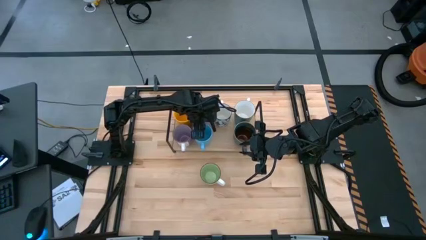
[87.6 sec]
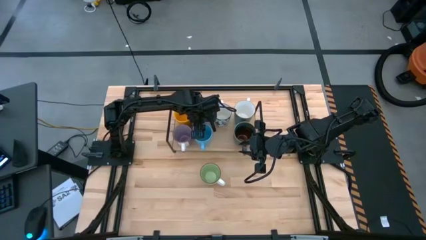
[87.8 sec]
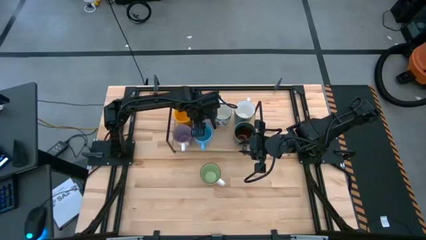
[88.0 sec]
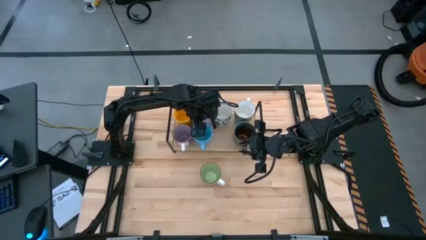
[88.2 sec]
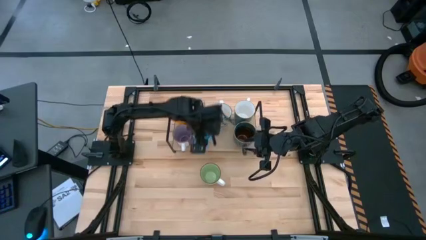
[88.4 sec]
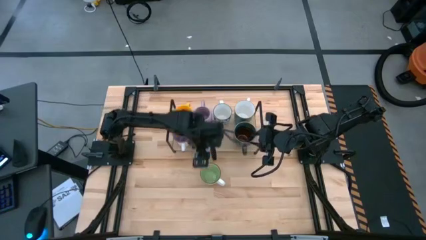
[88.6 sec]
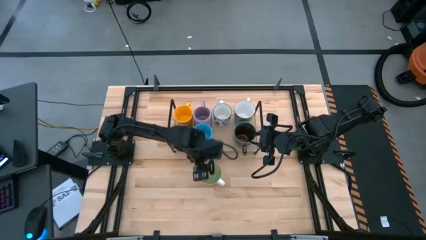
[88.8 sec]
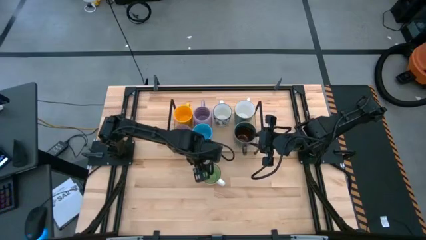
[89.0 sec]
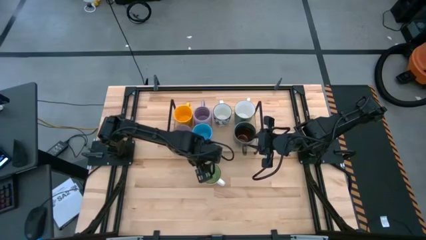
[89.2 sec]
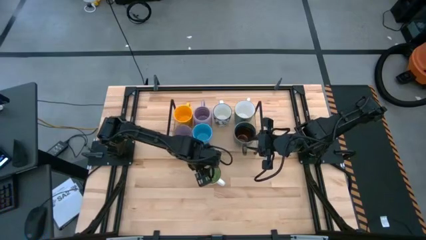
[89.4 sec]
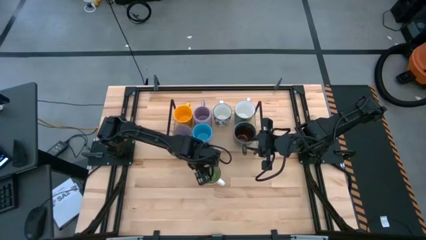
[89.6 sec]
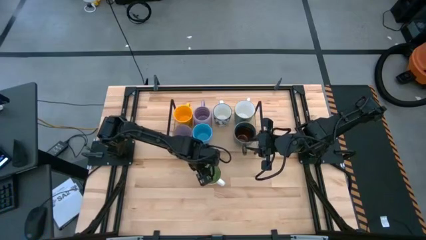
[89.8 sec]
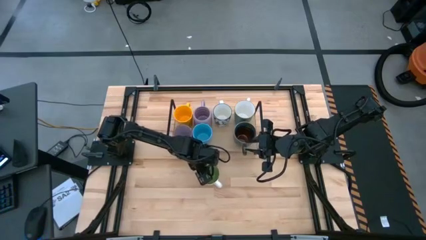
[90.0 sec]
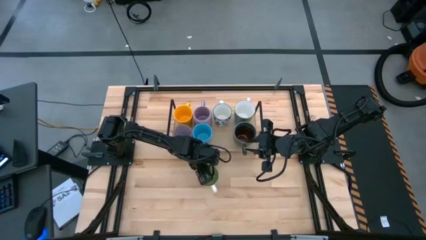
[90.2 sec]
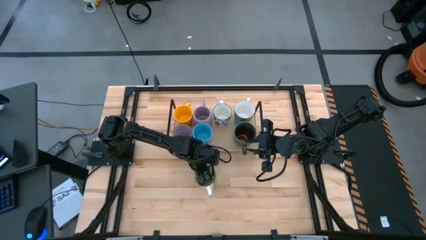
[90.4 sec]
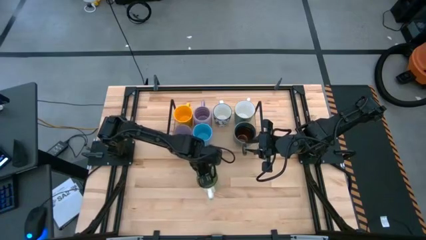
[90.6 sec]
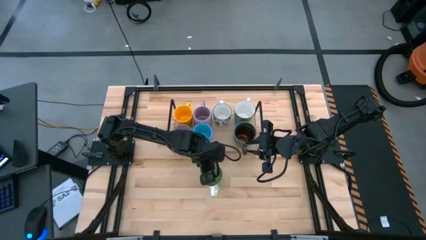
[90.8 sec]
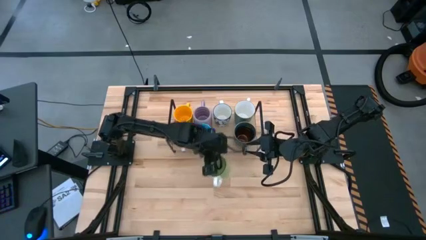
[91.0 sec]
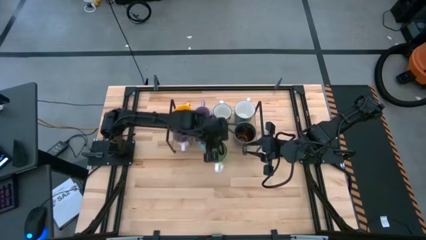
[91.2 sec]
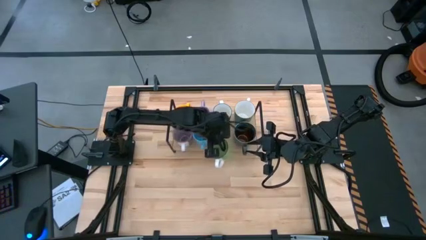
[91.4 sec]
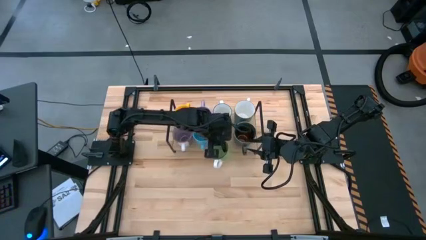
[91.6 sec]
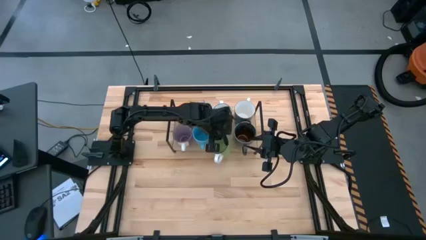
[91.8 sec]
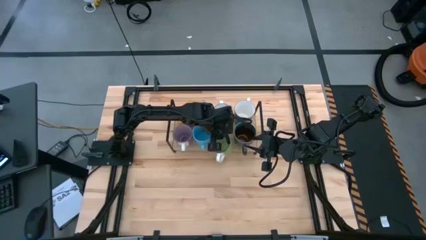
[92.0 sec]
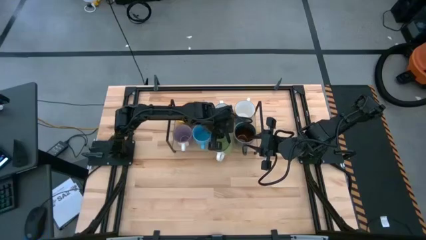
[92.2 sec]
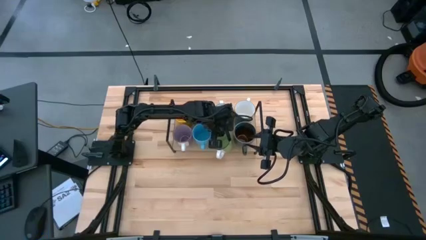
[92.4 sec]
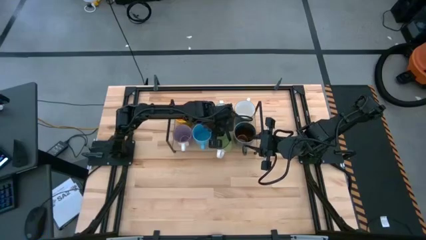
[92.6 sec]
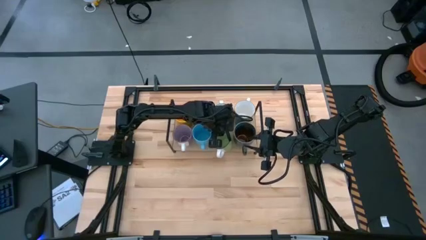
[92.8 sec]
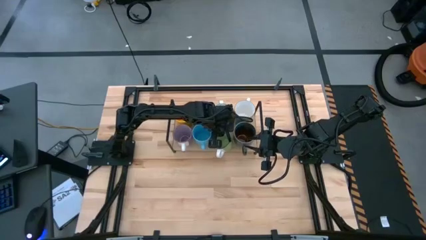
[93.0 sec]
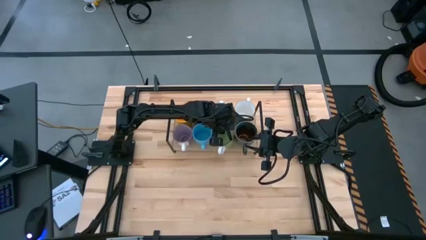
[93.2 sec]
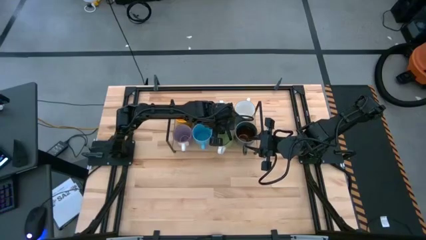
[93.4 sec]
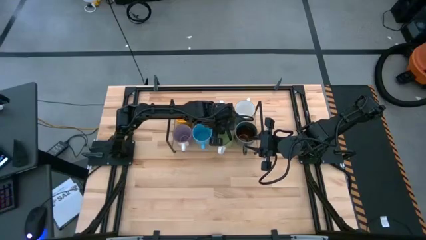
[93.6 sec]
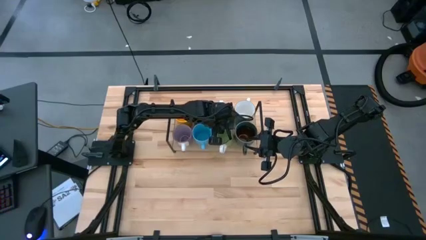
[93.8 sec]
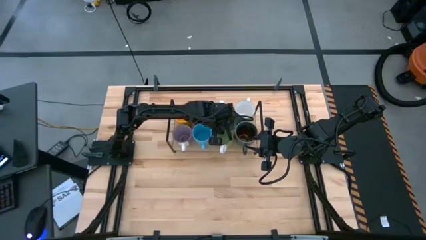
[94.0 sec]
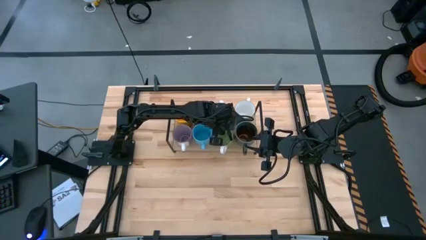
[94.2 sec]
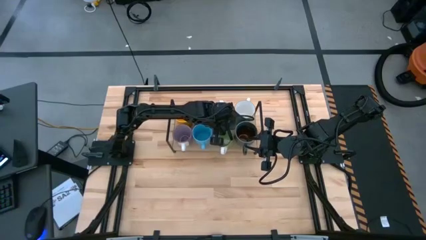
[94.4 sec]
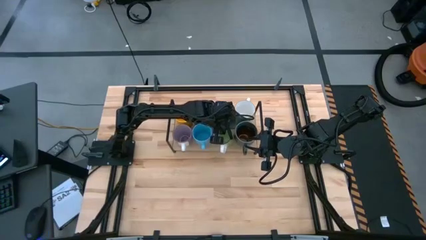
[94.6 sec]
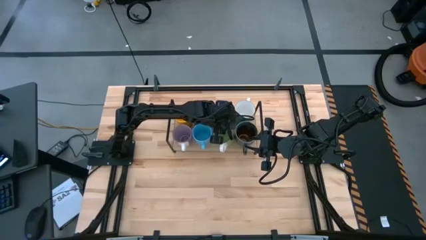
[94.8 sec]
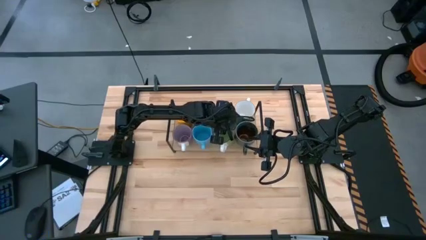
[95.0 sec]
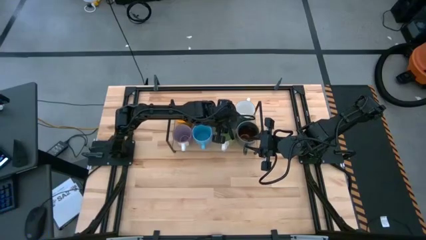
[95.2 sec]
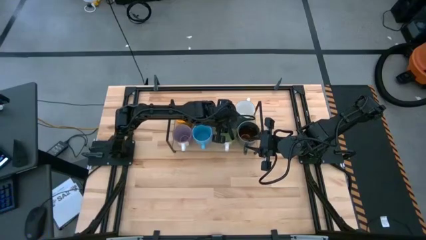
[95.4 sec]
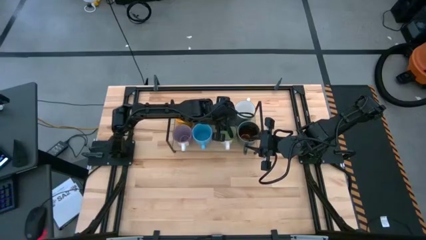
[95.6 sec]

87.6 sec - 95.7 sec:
Task: Place coffee mugs
Put the green mug on the shelf

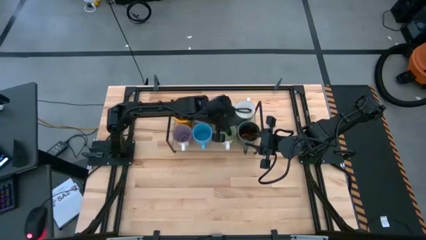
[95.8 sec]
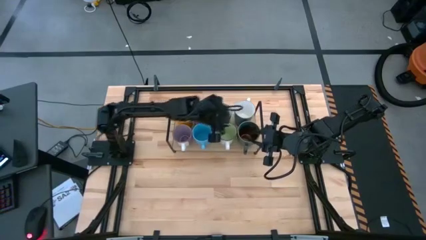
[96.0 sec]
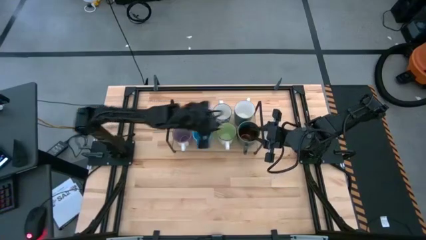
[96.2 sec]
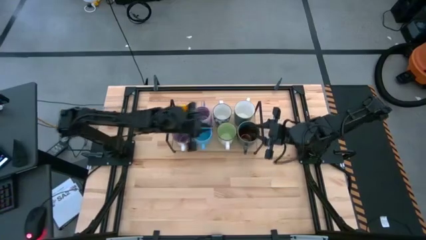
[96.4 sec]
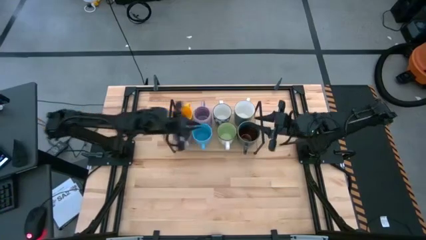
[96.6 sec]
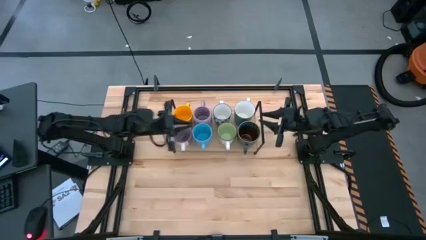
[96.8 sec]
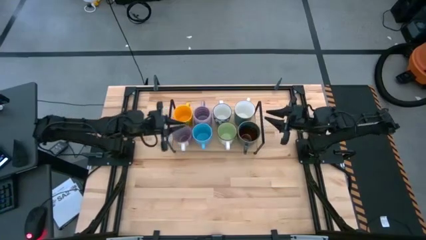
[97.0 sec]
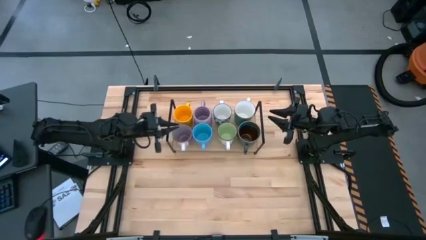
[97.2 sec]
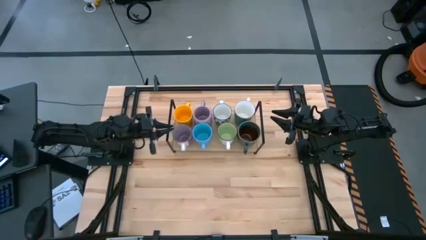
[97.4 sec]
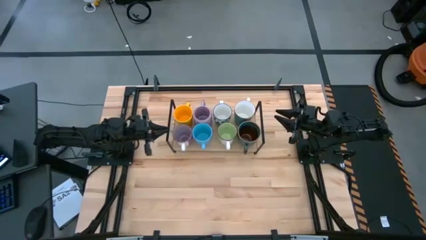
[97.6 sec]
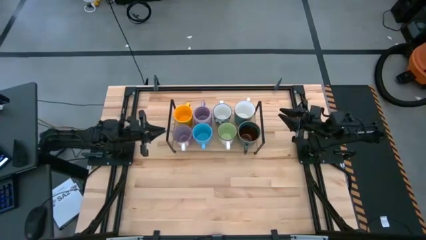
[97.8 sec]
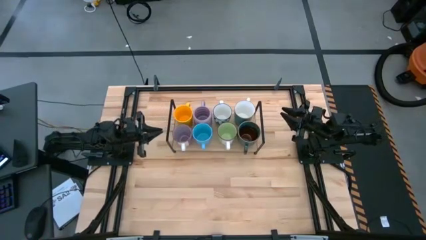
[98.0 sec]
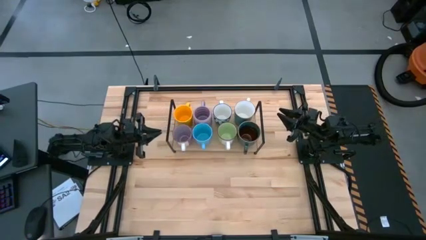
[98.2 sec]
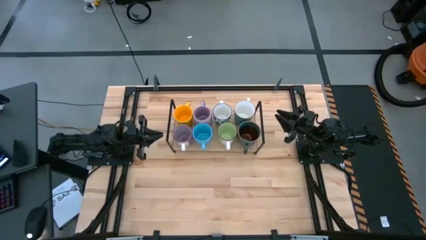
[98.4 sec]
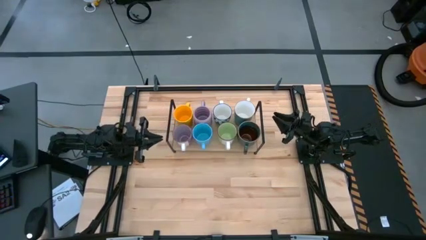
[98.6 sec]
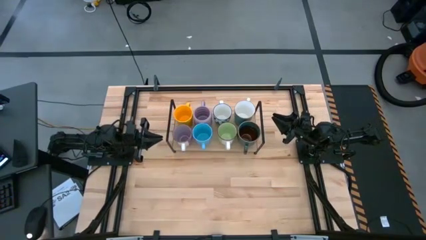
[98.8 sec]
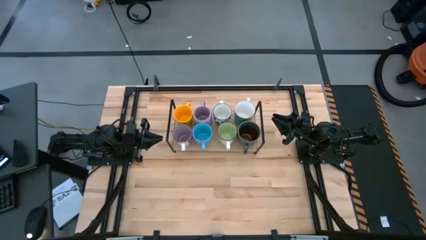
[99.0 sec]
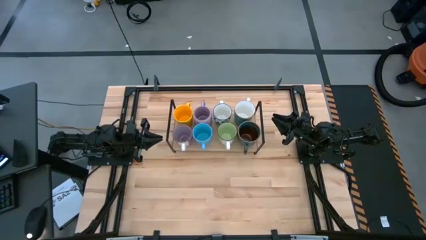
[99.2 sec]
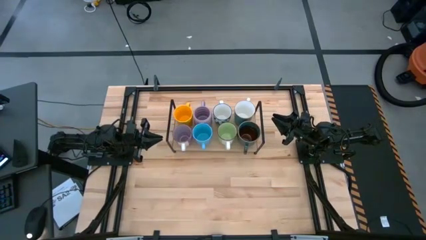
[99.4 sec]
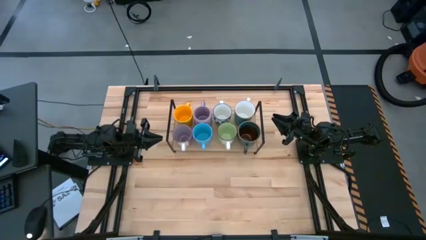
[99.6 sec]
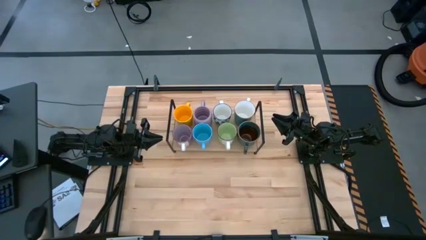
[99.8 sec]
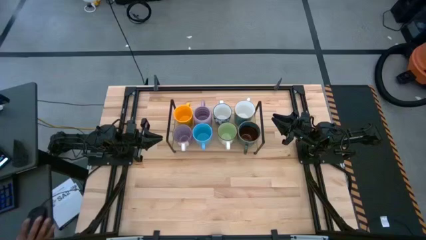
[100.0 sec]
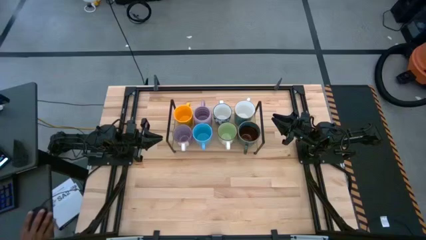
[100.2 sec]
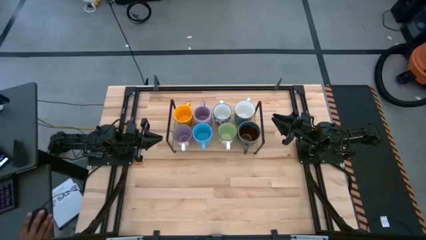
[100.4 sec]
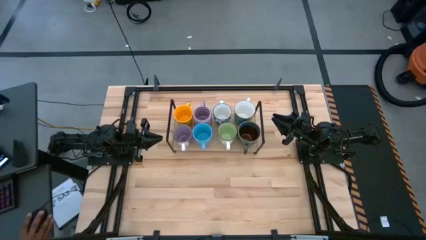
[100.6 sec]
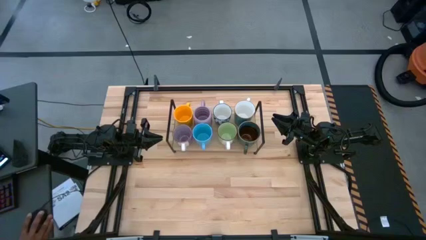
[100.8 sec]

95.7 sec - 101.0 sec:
Return to Home Position

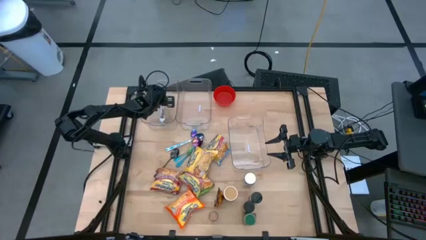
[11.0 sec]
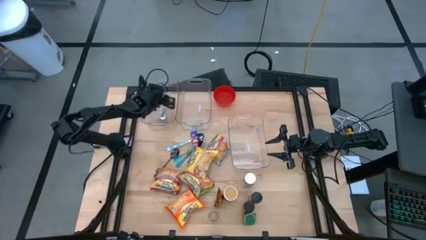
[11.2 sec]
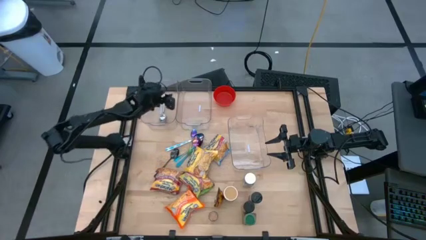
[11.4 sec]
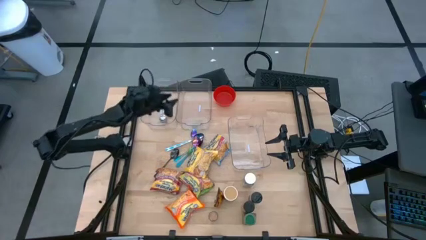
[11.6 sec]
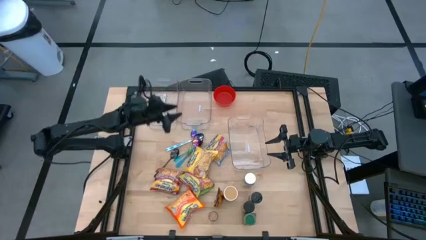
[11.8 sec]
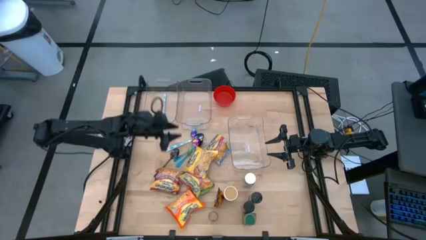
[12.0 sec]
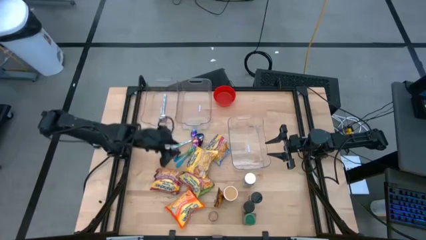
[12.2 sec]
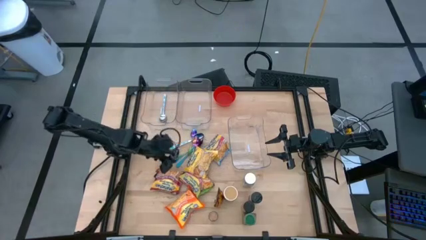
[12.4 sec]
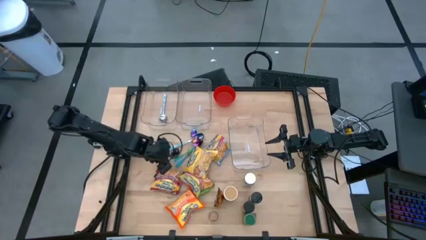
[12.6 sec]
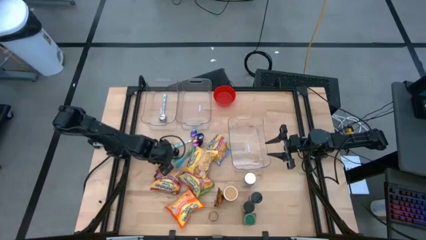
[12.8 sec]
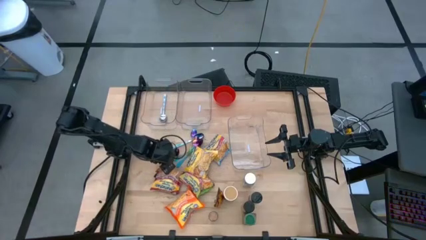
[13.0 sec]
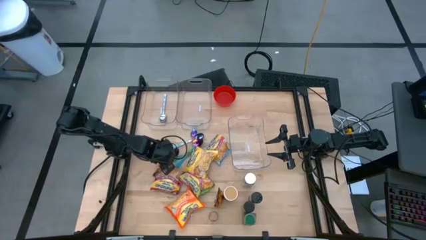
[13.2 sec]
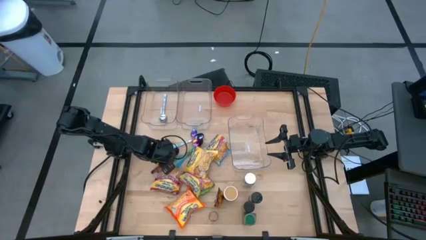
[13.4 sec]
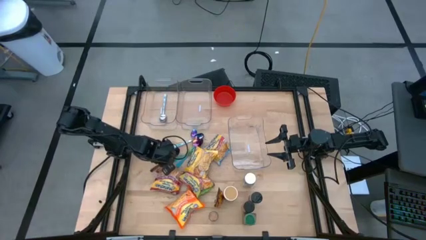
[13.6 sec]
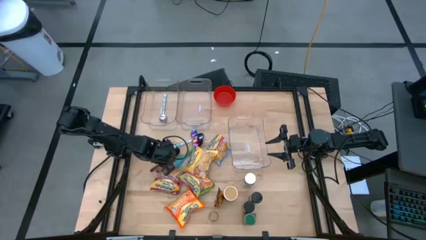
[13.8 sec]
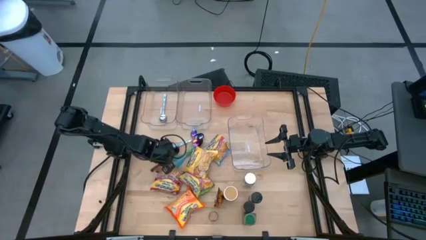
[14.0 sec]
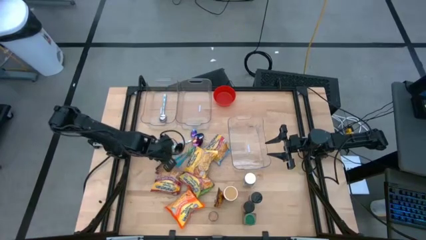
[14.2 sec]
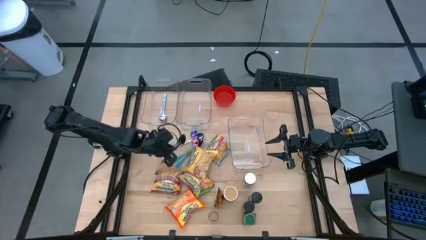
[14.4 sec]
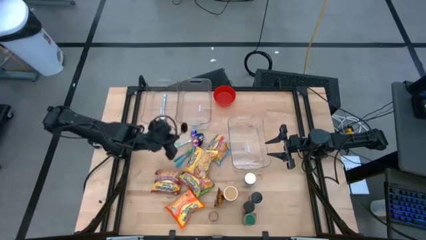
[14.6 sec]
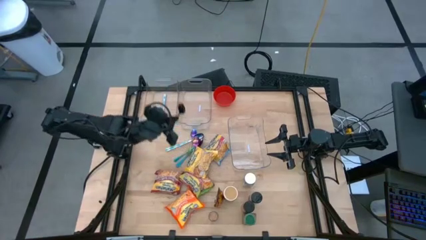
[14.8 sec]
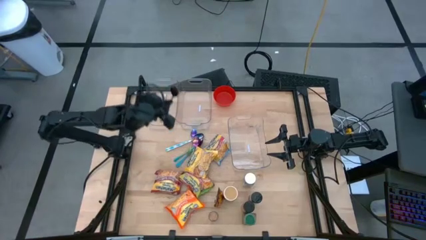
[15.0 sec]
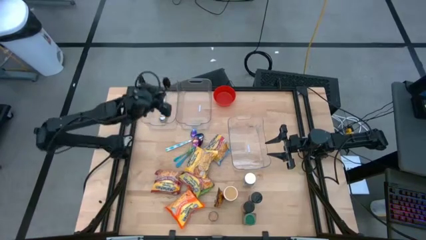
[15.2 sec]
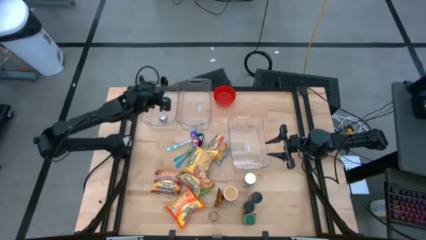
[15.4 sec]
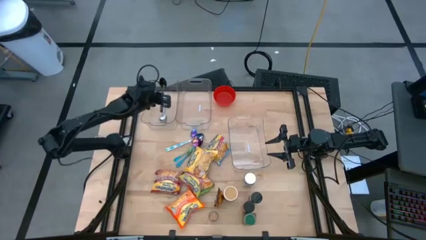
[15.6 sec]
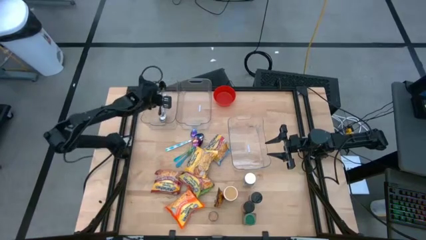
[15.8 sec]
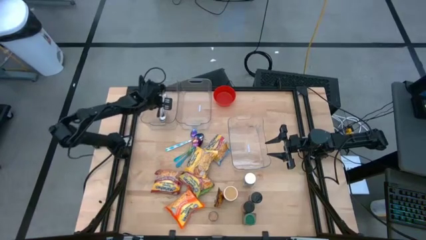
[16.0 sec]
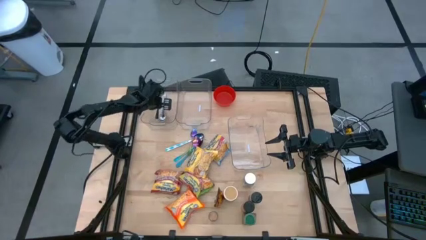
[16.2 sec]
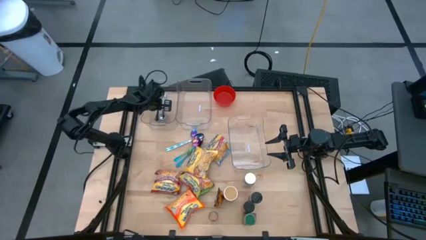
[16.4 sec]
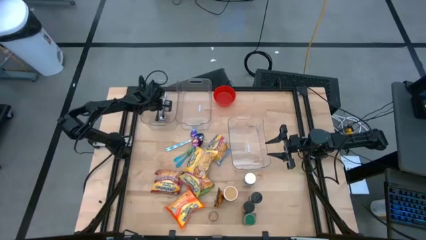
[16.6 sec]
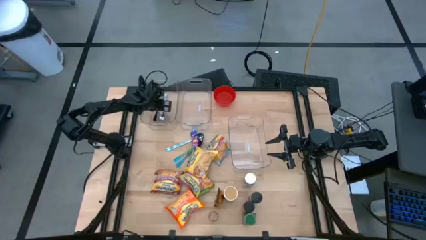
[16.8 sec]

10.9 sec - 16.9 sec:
Task: Pick & Place Food Item
Put the black spoon into the top left transparent bin
